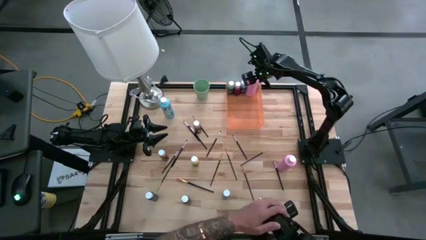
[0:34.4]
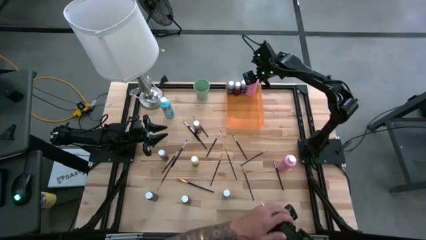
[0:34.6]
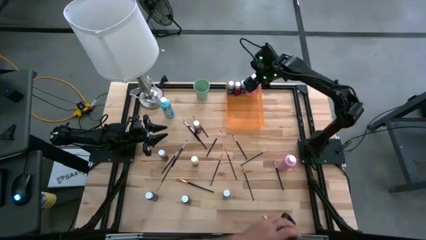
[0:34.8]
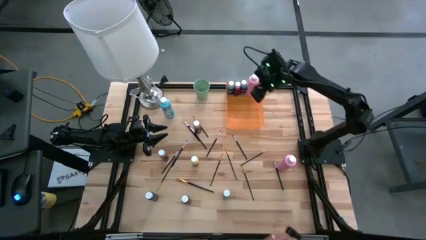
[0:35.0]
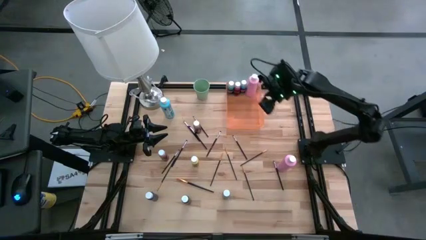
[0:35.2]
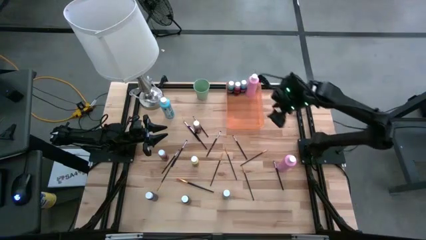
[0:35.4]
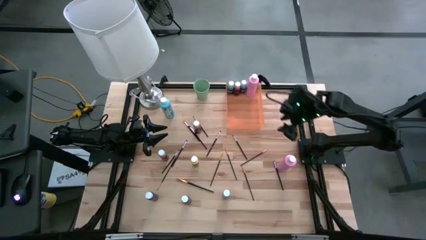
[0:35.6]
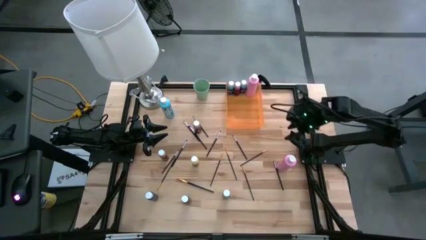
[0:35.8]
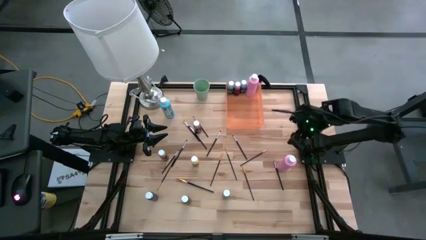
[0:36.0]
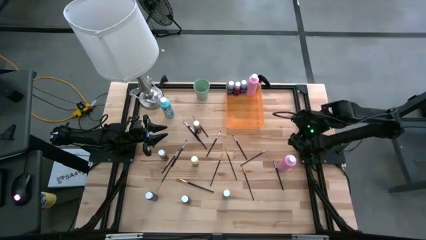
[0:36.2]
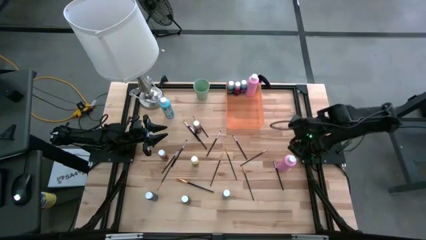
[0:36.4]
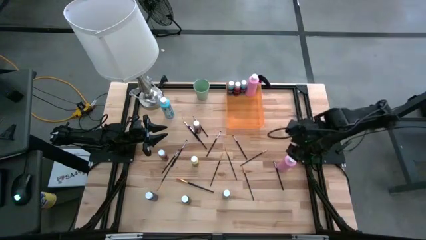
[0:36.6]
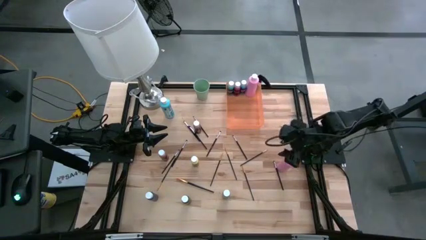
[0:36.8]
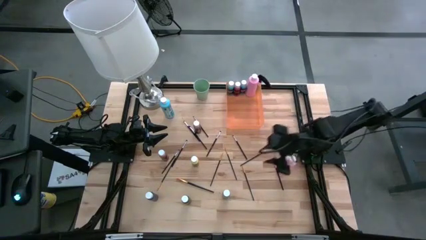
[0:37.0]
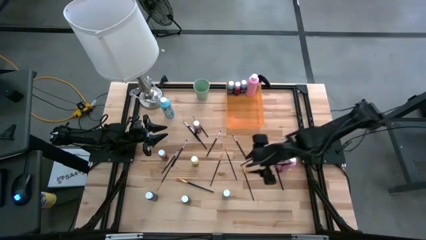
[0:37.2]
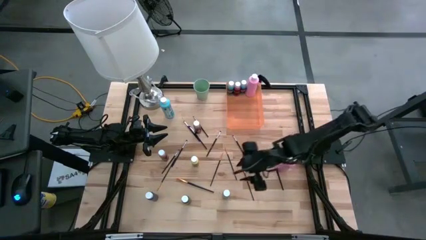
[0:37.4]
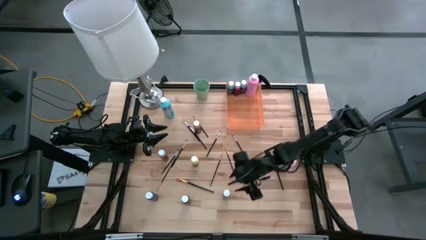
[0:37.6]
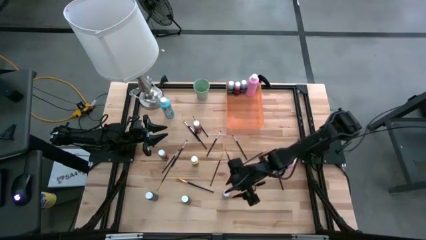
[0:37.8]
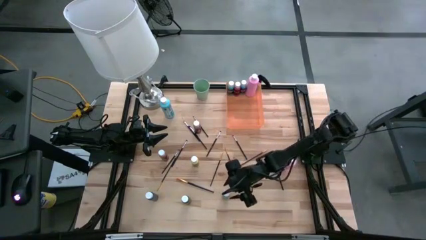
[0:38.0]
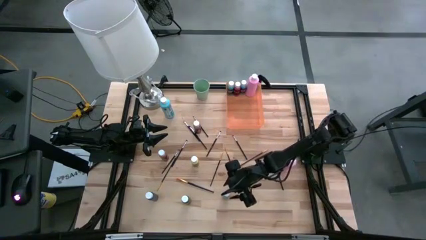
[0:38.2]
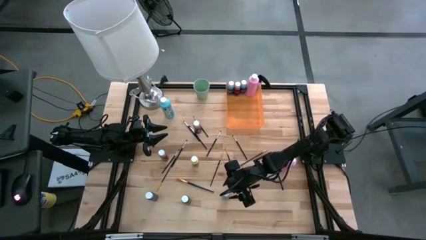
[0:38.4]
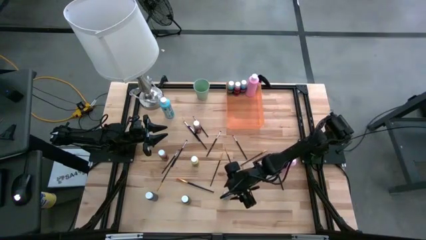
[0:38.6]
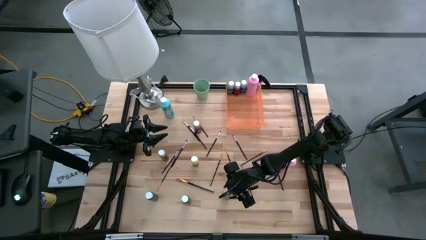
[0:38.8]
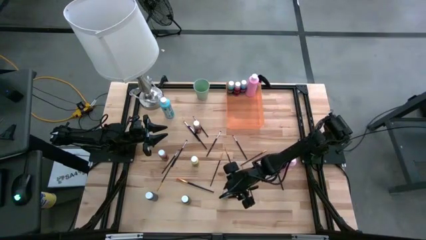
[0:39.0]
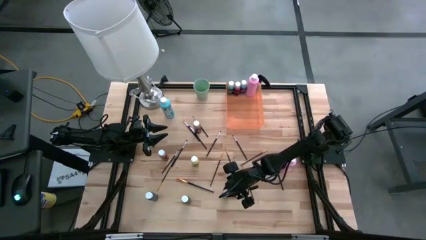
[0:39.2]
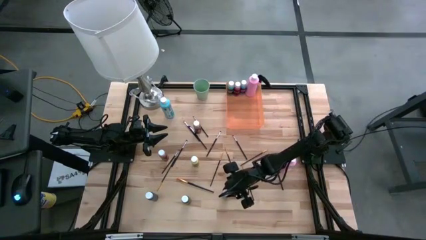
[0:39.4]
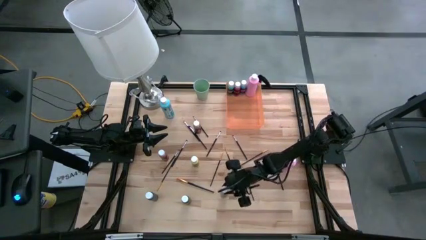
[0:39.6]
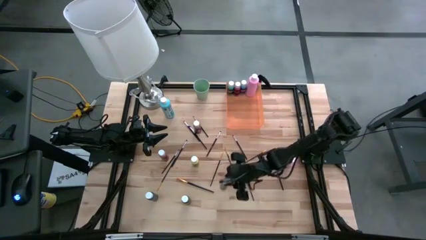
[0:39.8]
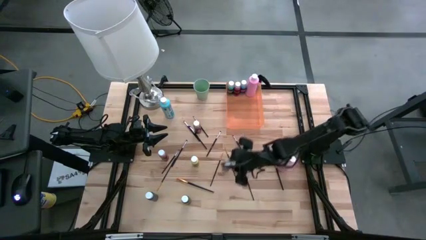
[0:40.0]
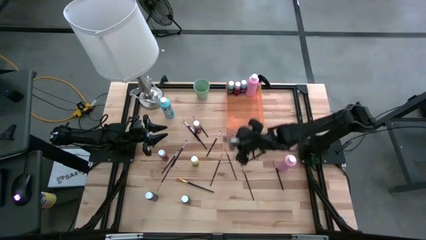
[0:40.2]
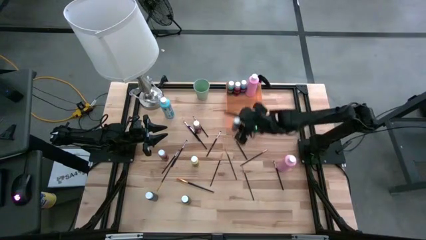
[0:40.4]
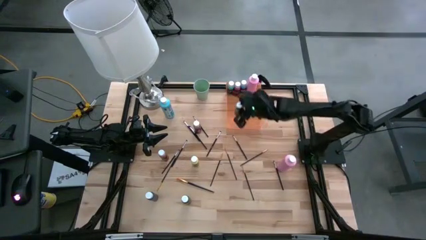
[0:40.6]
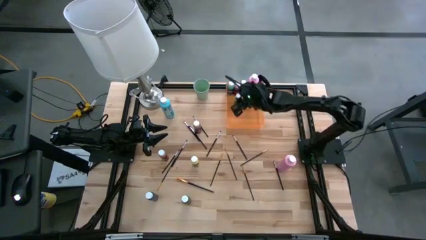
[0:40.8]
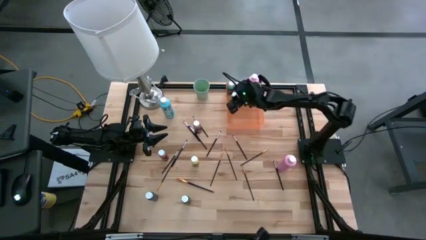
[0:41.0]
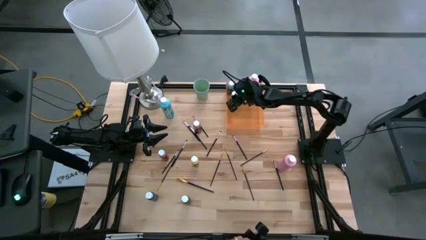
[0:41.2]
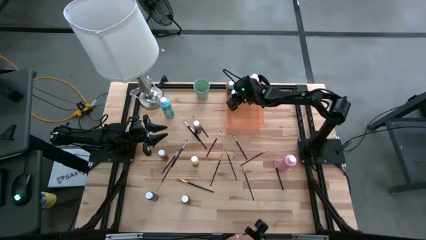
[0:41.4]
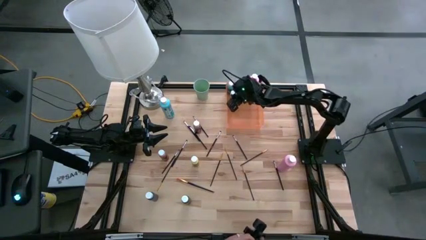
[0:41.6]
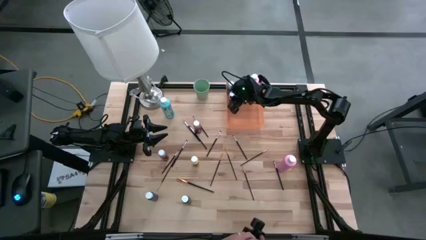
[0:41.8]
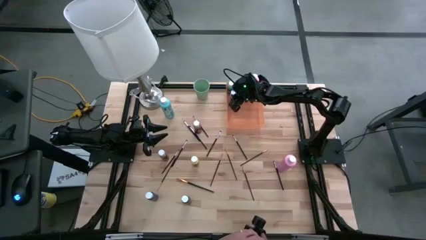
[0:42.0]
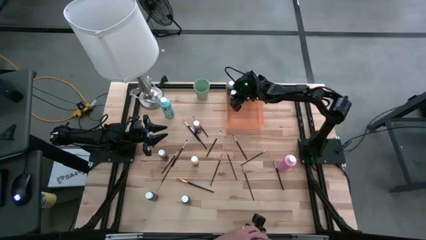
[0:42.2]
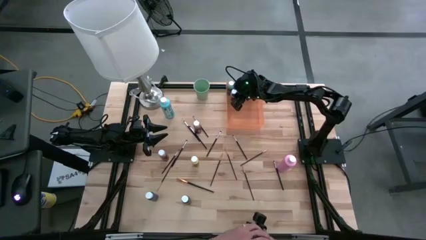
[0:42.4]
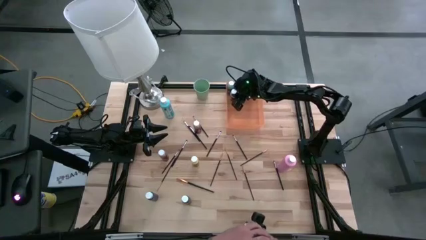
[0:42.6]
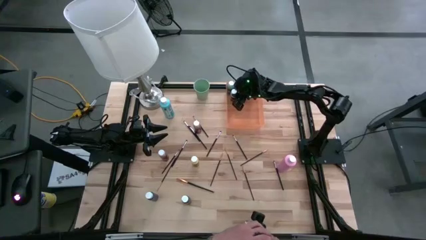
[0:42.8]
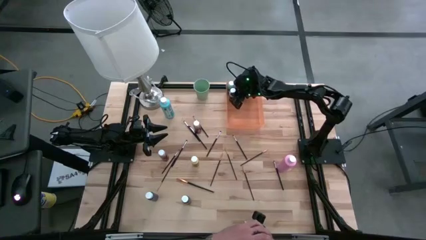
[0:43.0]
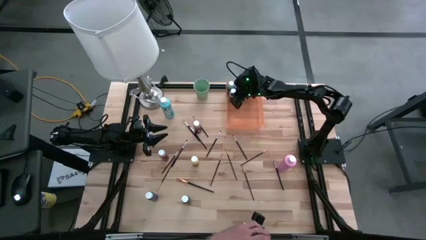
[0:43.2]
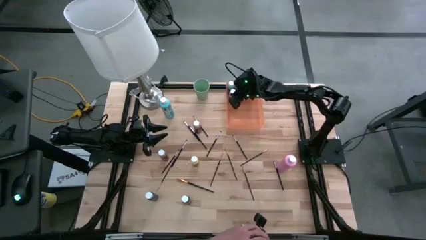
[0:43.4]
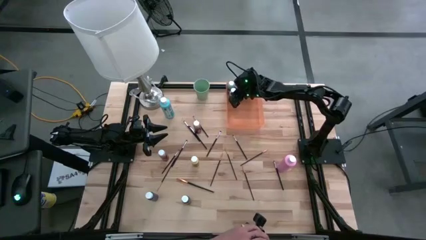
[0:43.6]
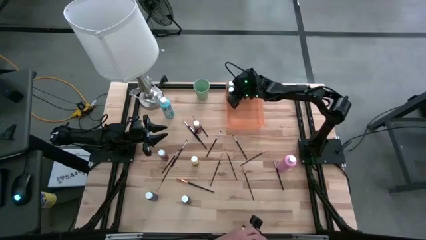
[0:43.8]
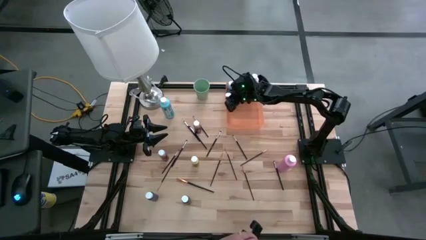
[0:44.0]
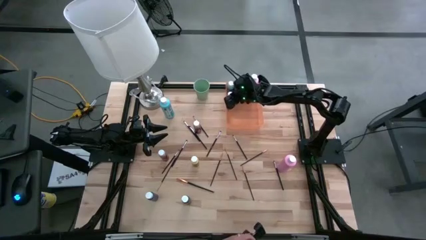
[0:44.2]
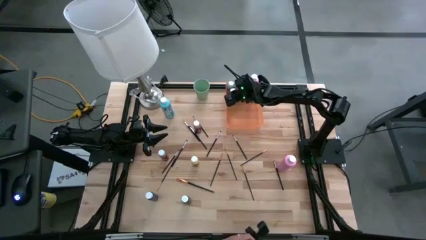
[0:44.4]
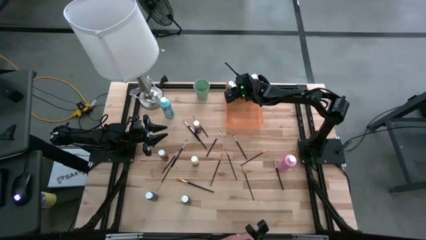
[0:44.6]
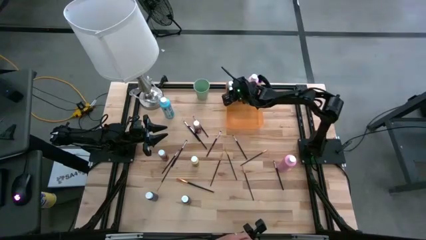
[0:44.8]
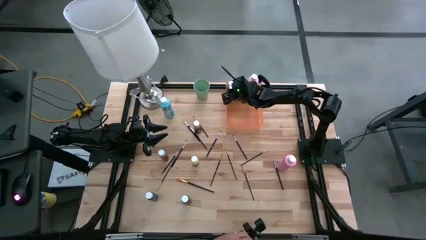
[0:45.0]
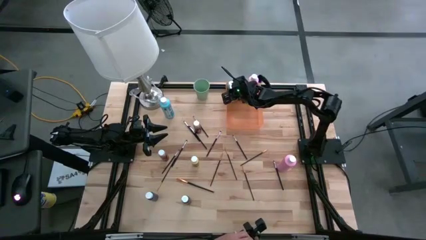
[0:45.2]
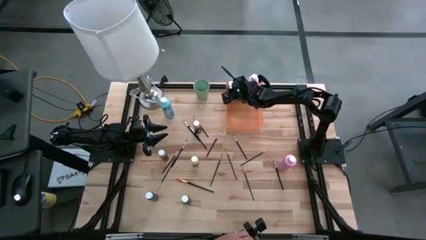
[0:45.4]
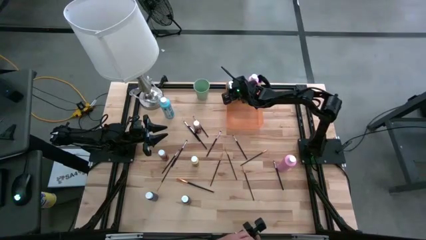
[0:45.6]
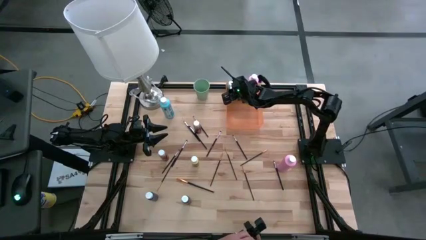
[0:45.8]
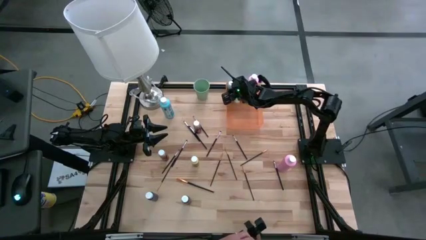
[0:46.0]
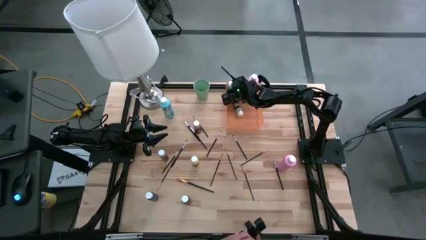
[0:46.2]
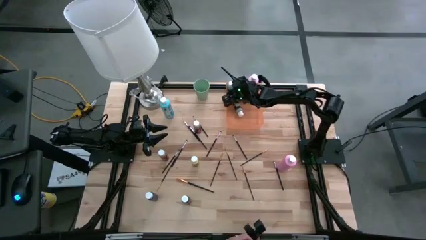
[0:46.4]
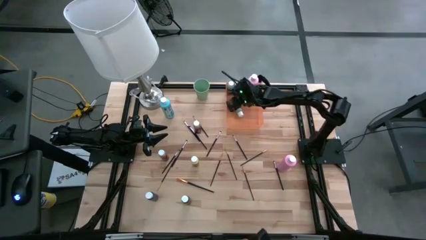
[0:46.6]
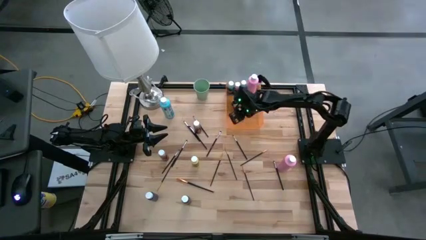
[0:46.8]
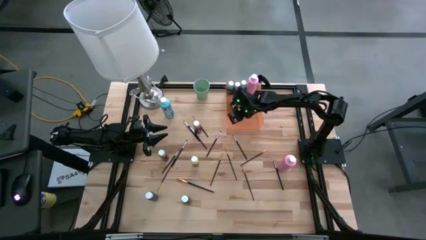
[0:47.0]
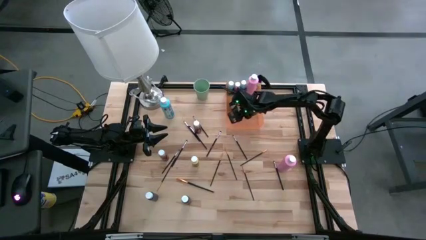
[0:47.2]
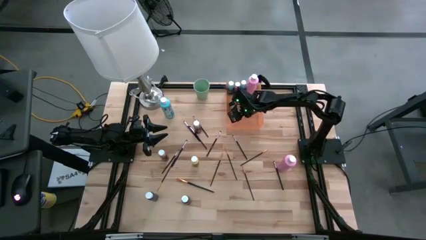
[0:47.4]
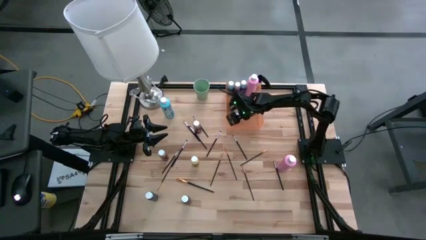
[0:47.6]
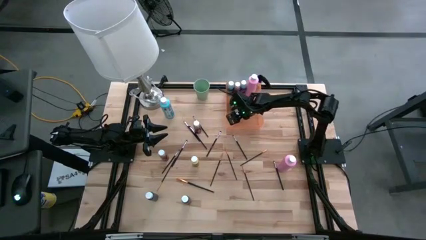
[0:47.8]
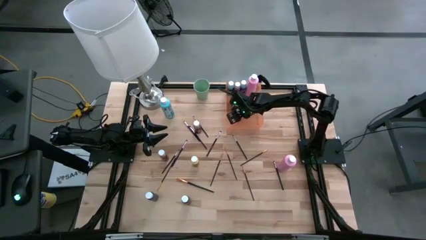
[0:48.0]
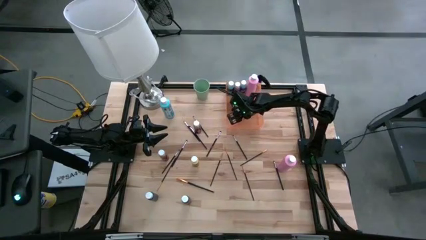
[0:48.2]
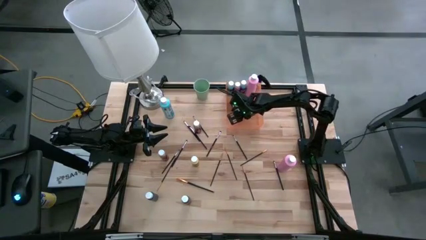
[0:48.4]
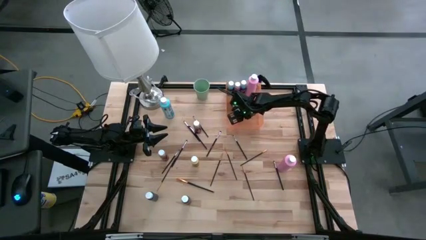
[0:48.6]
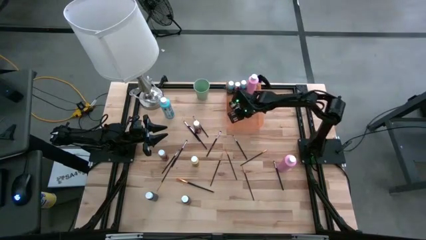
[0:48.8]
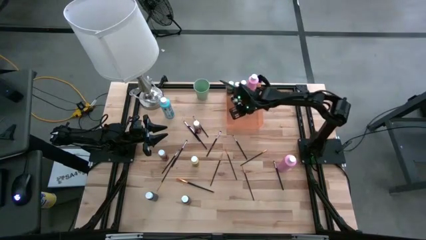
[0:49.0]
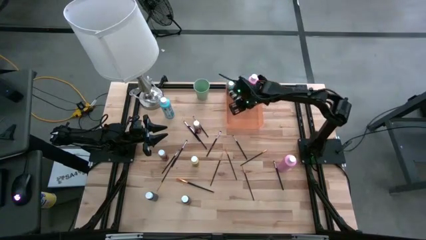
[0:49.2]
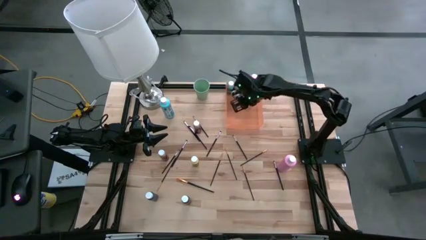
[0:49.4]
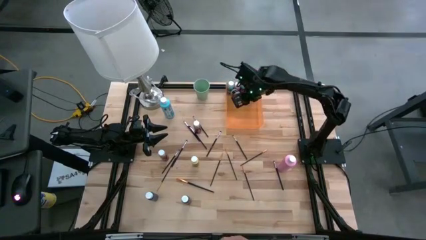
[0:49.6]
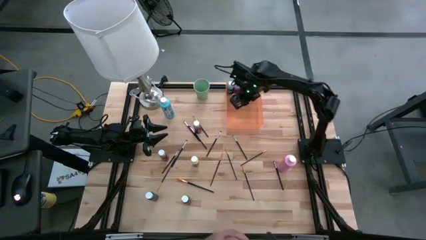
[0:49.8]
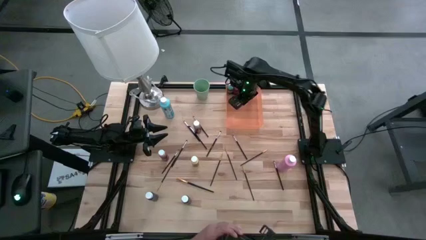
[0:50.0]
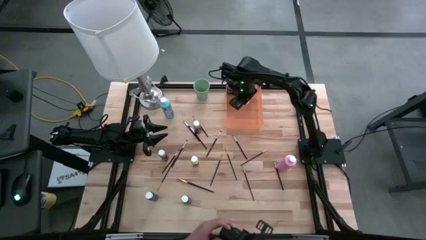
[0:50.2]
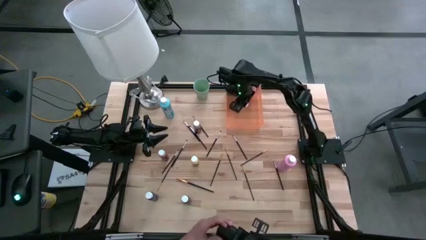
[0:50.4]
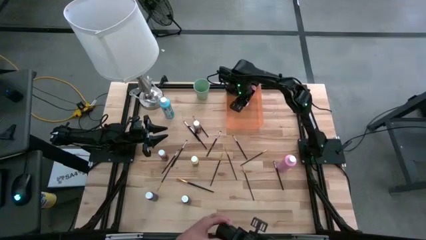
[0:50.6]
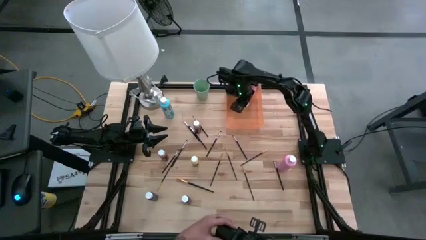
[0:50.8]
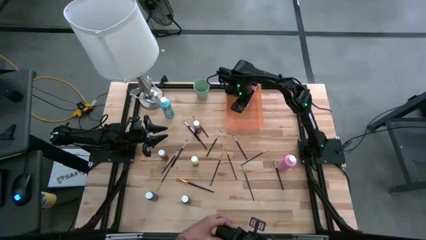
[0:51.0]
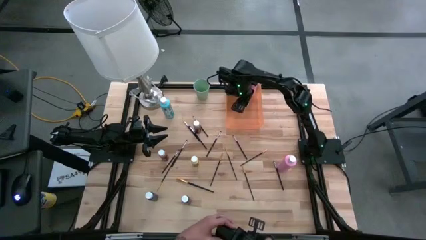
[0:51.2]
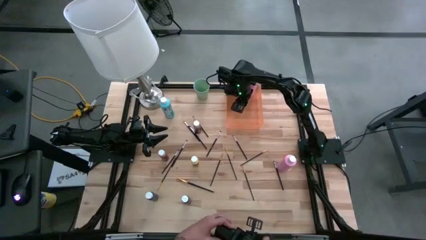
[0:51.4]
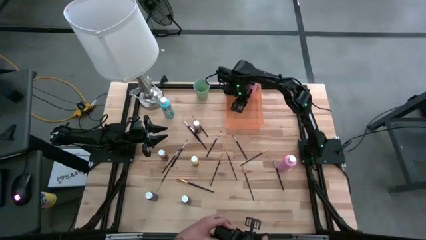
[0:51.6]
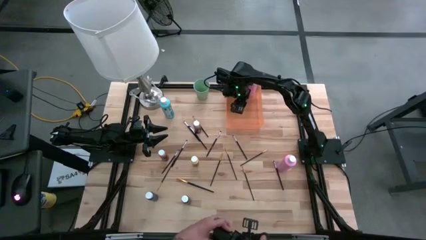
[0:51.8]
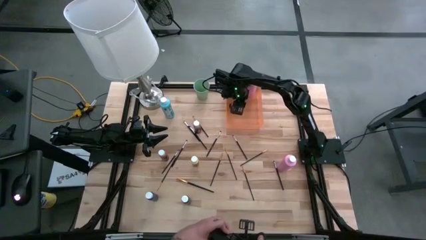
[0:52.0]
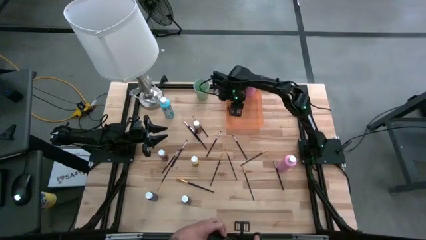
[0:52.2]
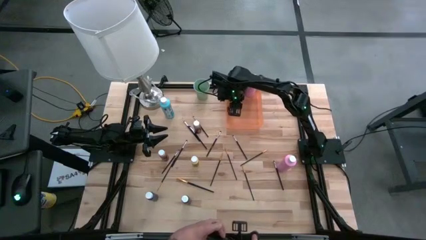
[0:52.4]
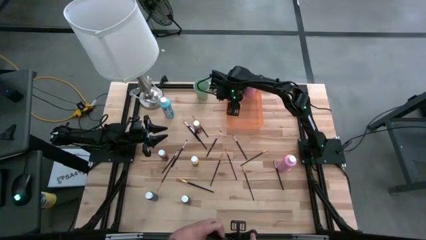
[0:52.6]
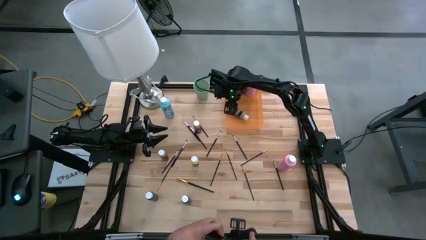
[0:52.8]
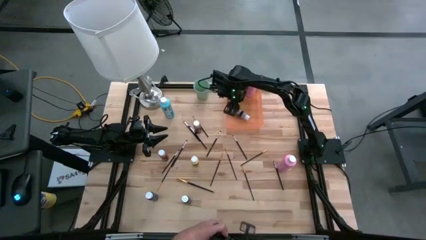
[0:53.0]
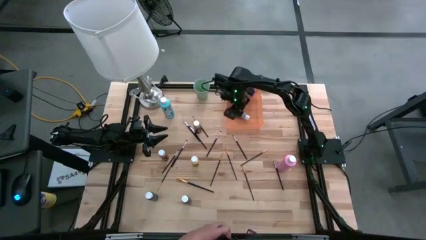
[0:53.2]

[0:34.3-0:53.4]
Task: Pick & Place Paint Supplies
Put the gray paint bottle into the orange bin
